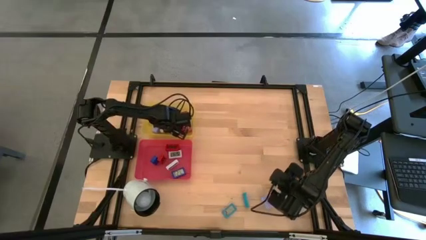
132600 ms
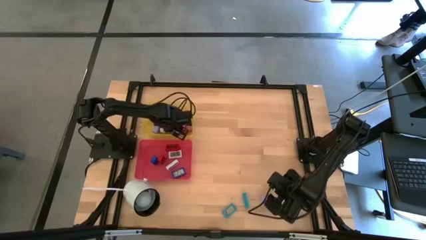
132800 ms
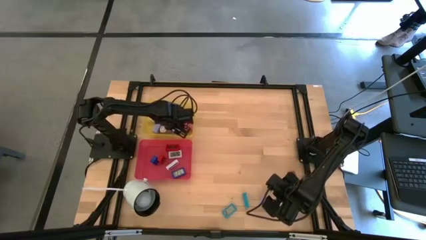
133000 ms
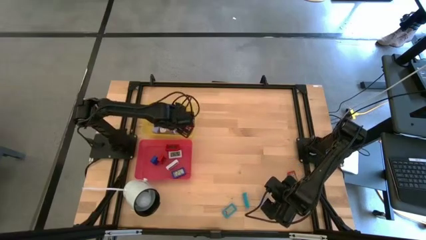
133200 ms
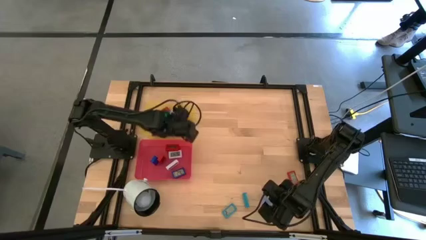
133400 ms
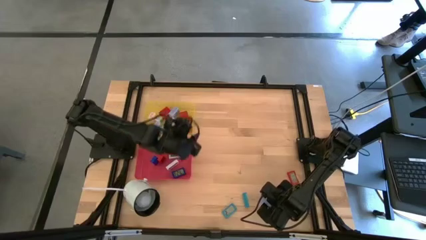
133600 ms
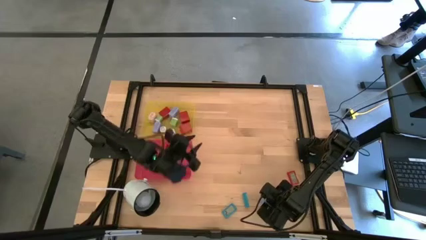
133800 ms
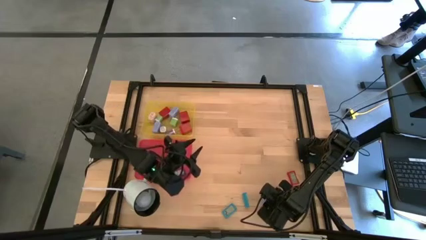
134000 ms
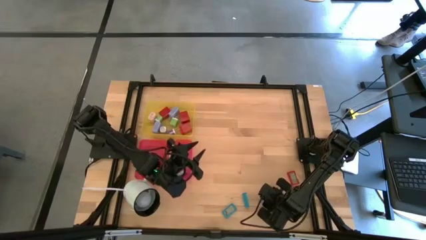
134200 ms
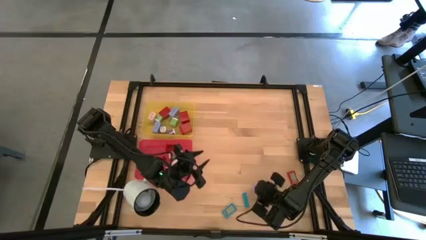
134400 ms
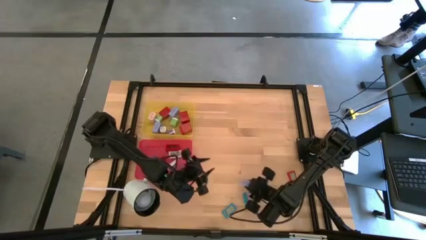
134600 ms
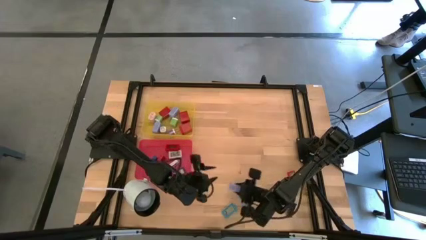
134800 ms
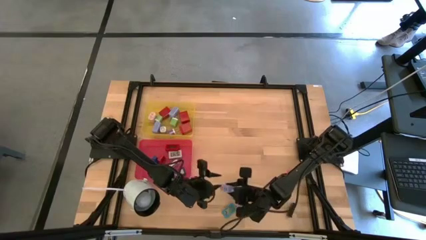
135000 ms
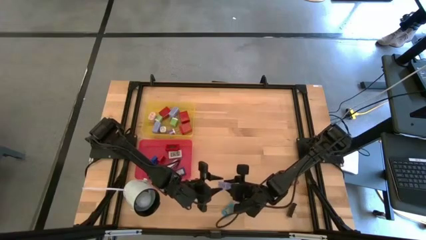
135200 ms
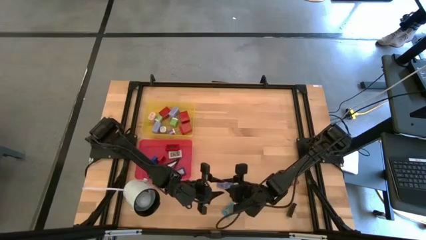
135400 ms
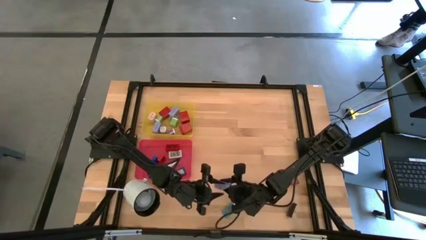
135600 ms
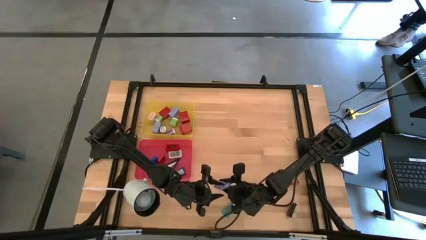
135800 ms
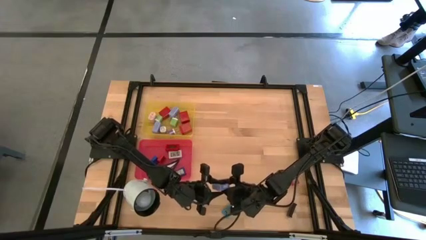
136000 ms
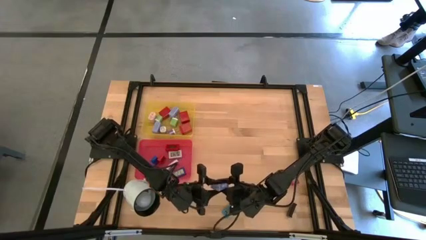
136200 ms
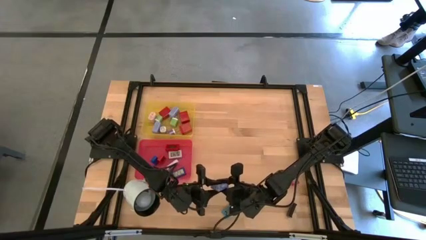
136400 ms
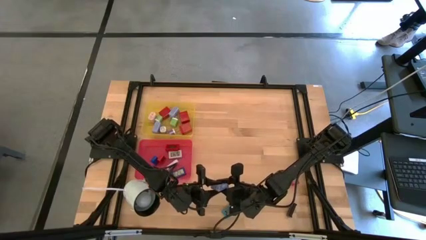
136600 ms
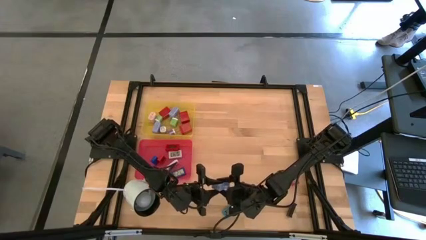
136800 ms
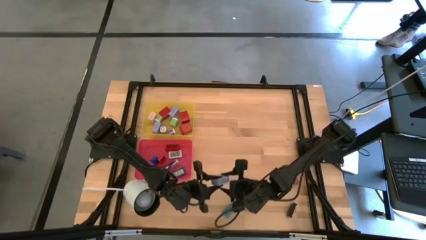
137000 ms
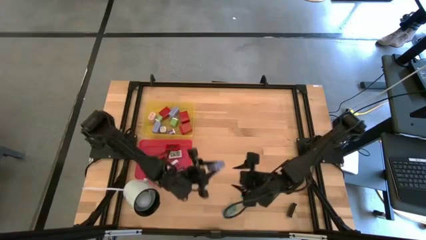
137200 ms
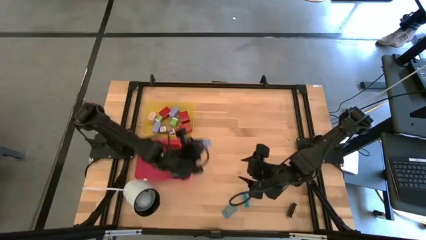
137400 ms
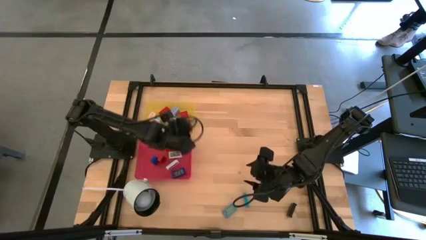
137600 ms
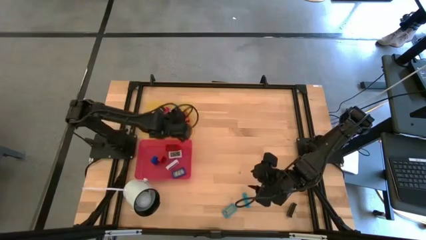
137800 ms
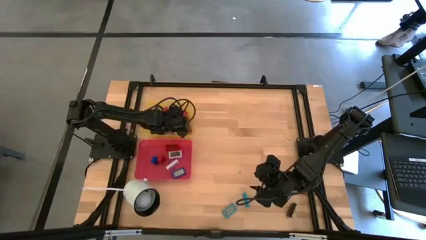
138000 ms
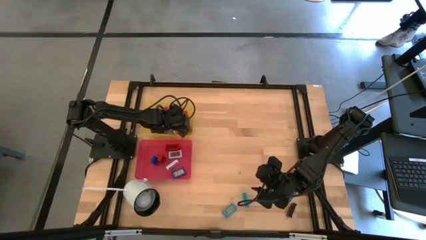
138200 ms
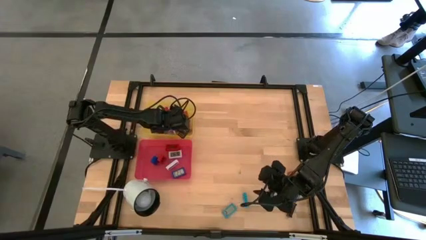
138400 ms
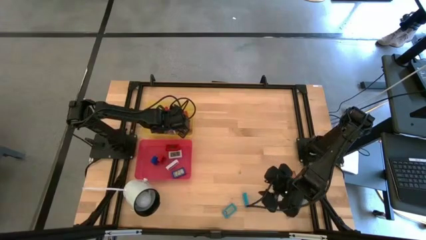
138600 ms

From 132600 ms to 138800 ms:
Task: Pick & Place Office items
Put the blue charger adapter into the yellow bin

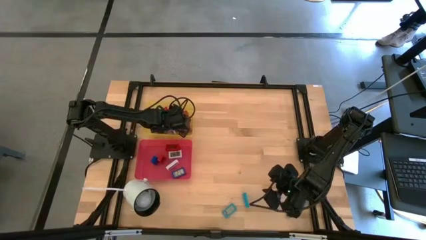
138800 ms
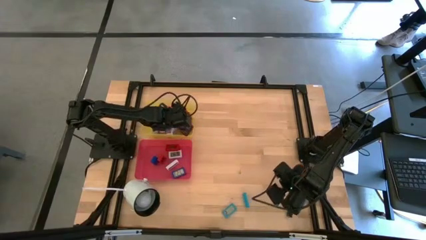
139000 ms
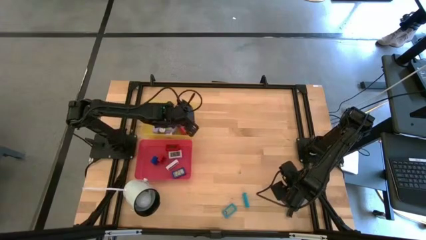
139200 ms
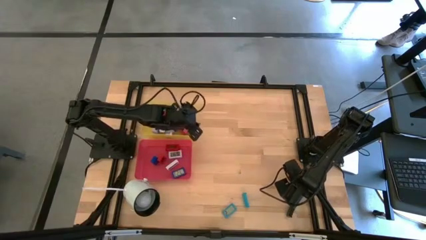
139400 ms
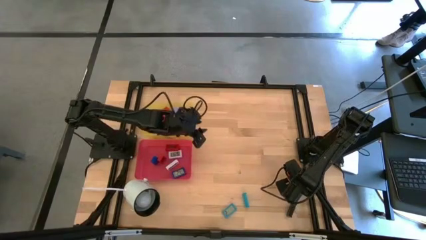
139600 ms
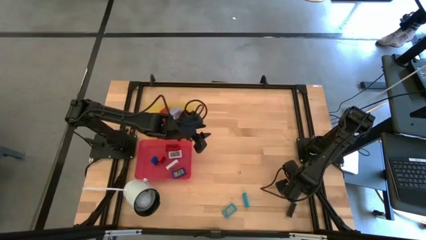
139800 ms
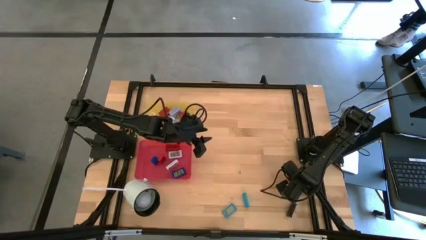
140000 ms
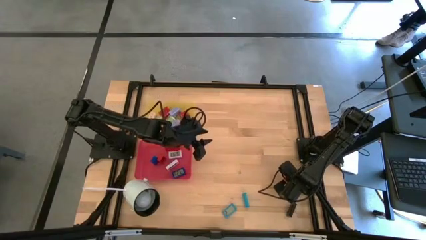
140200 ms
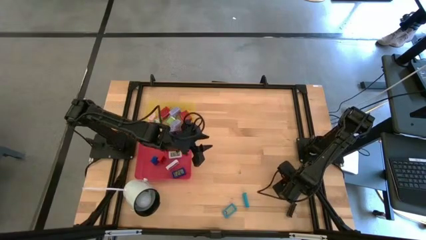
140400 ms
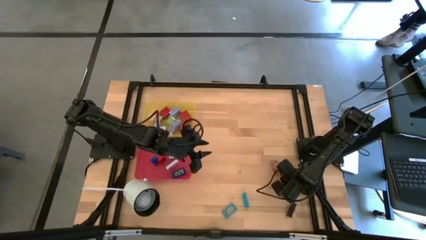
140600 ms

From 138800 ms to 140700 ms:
Put the red timer into the red bin

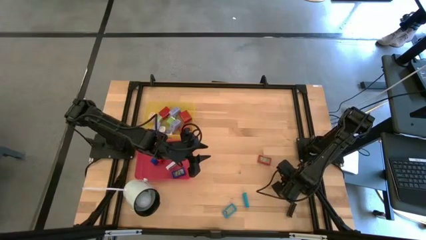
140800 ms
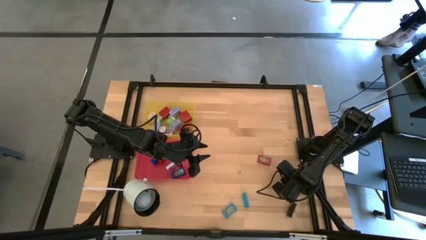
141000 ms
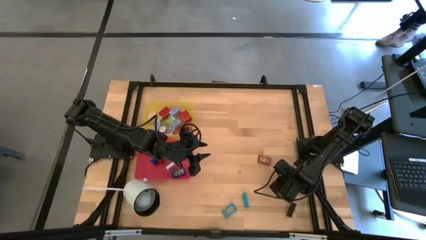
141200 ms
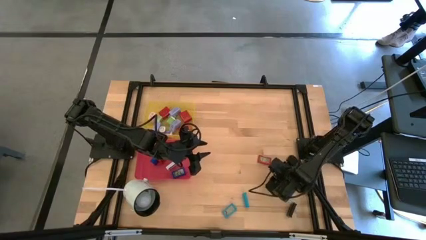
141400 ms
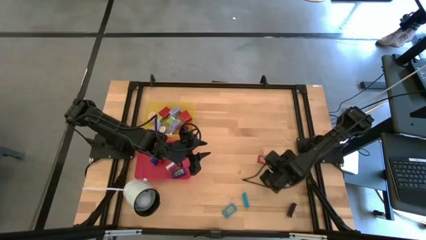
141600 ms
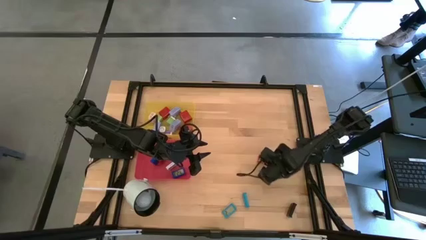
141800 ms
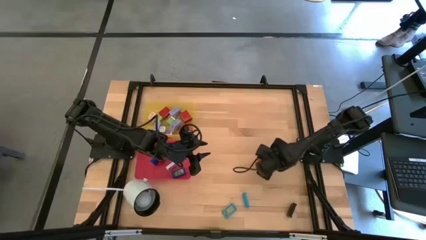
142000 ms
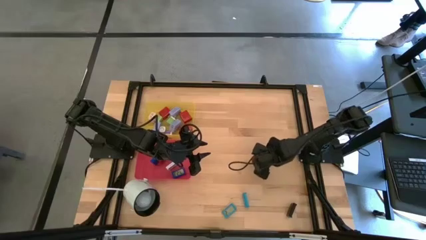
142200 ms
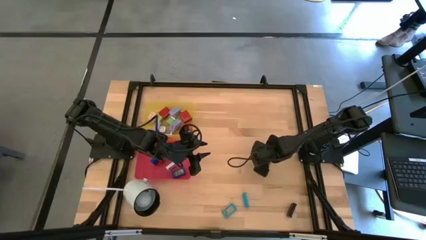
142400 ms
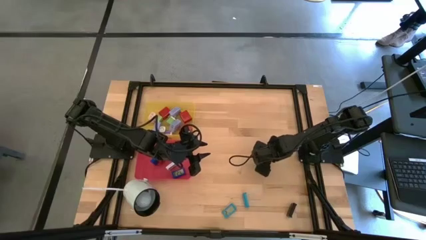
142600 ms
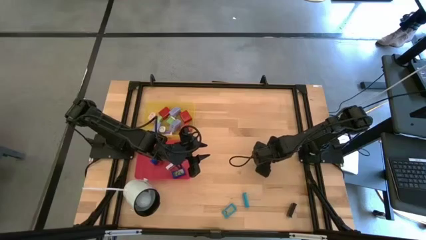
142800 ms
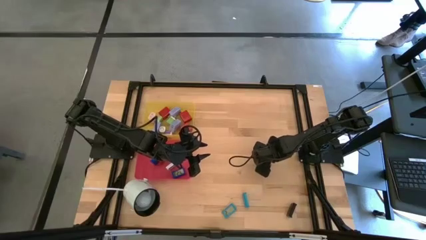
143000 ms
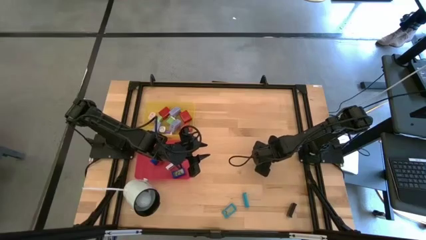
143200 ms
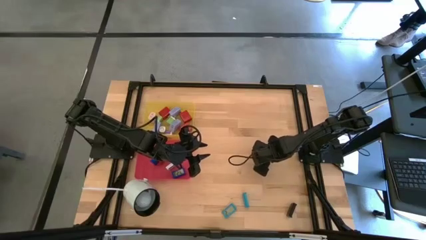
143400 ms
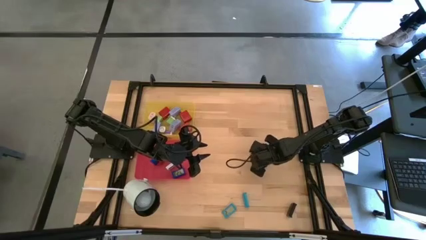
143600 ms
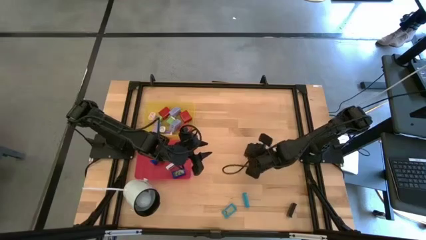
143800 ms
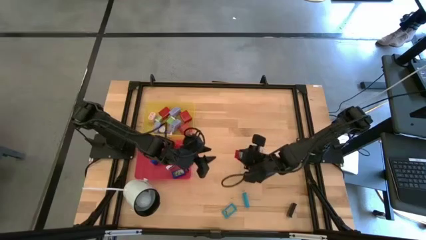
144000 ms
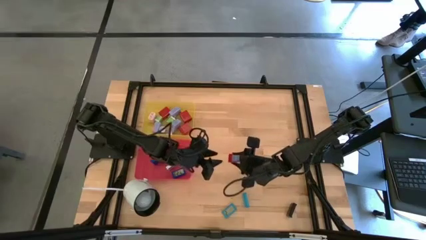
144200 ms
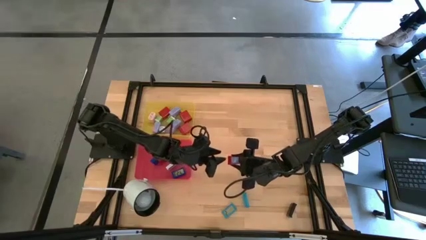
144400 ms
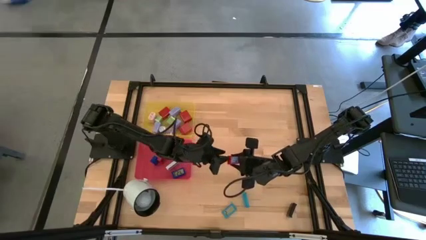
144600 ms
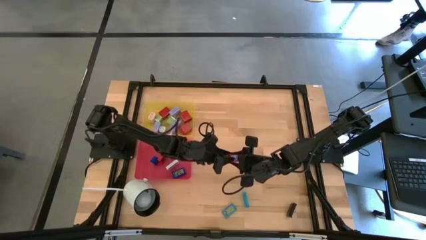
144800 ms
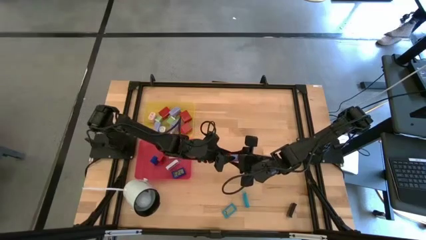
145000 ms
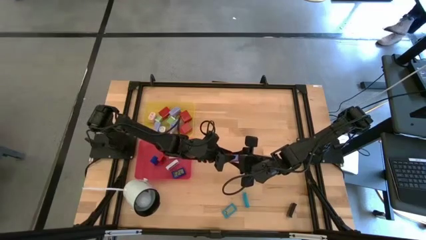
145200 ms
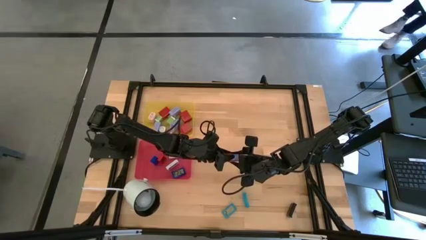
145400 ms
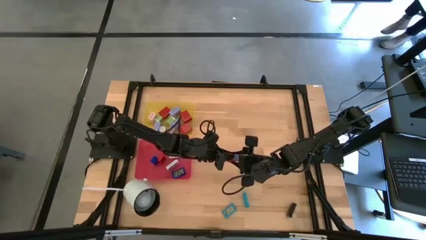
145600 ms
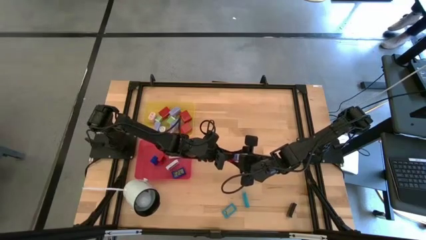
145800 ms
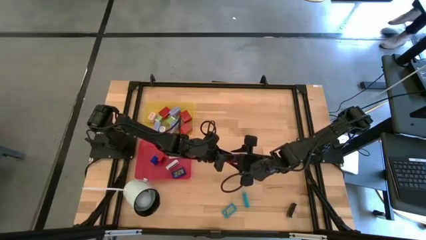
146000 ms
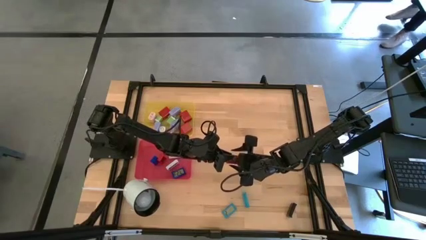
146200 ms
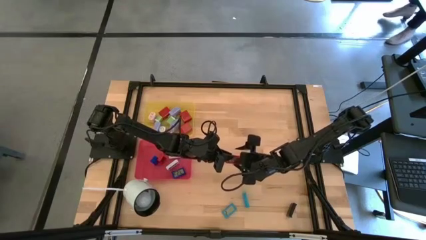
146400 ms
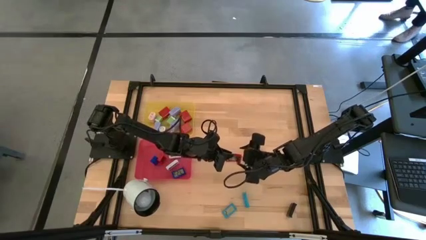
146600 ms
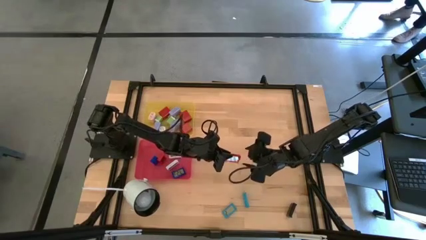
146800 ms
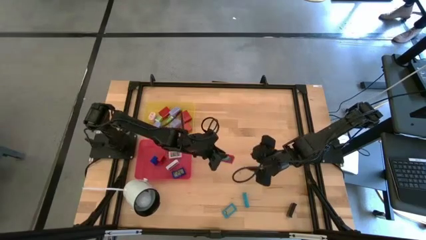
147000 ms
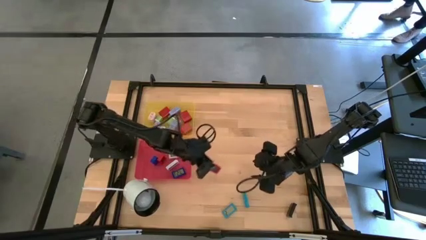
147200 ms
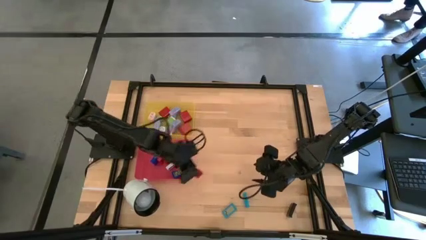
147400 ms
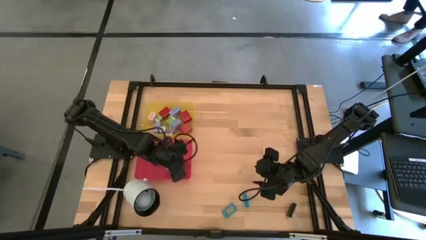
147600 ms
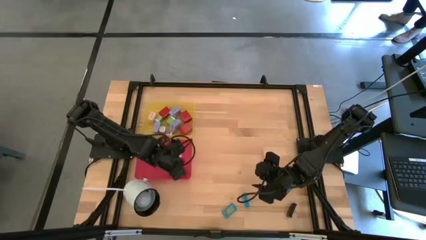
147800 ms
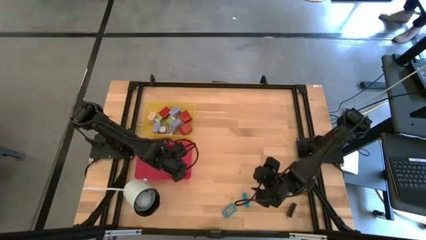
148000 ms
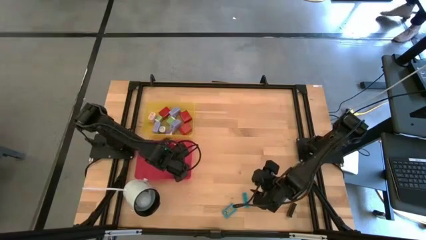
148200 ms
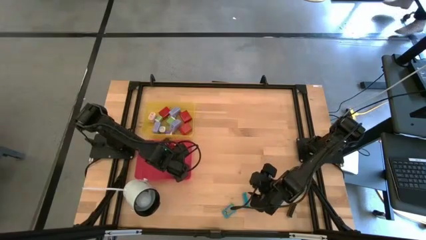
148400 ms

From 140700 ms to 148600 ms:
Put the red timer into the red bin
